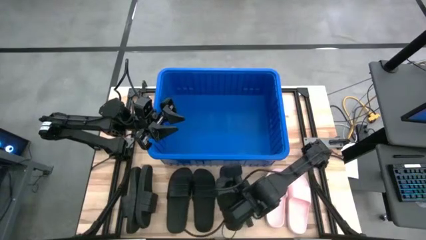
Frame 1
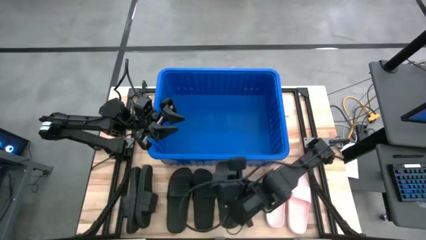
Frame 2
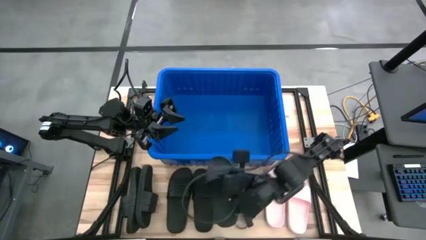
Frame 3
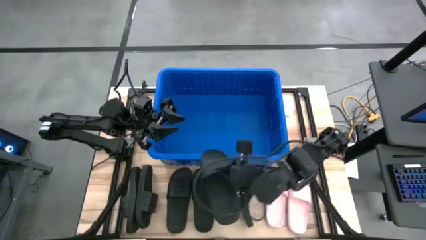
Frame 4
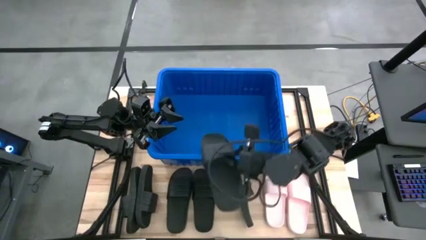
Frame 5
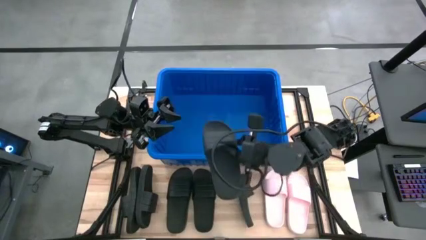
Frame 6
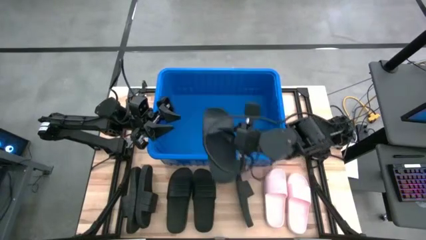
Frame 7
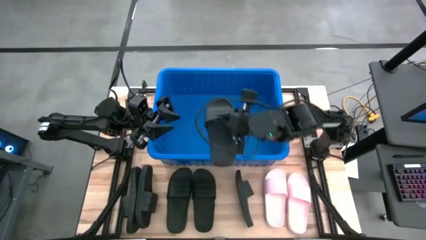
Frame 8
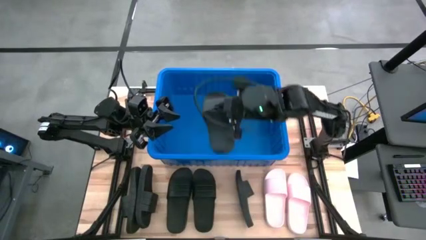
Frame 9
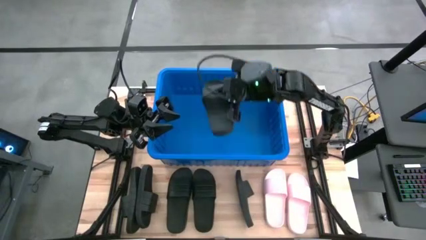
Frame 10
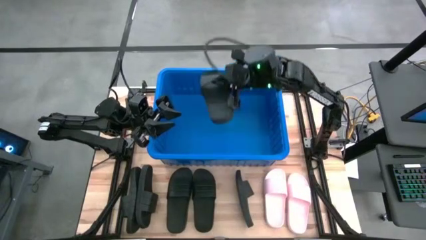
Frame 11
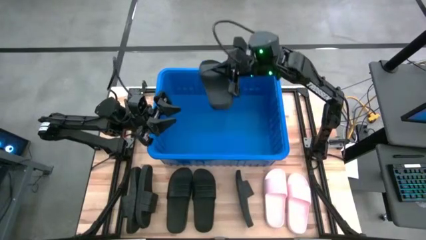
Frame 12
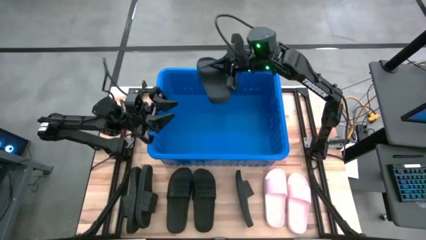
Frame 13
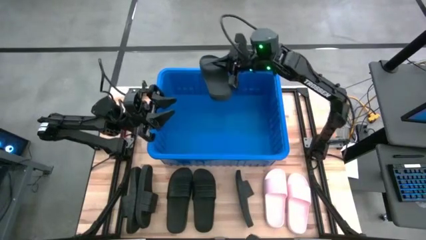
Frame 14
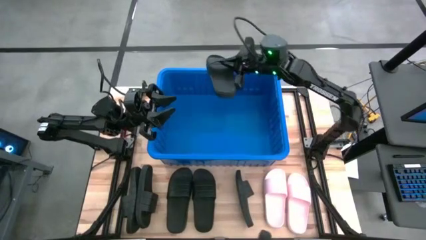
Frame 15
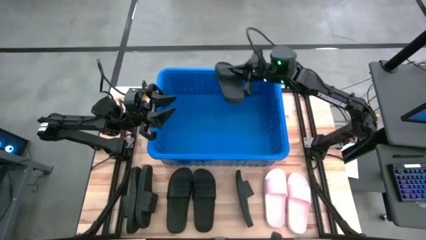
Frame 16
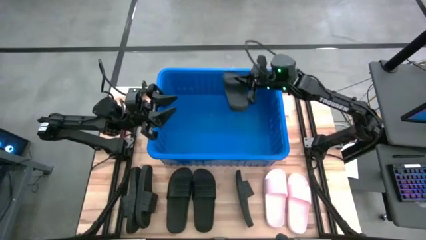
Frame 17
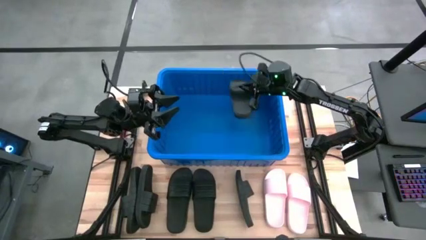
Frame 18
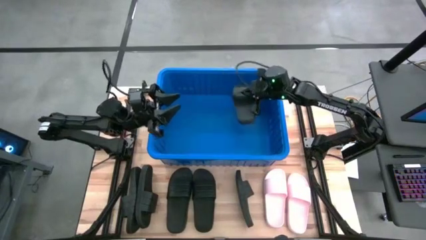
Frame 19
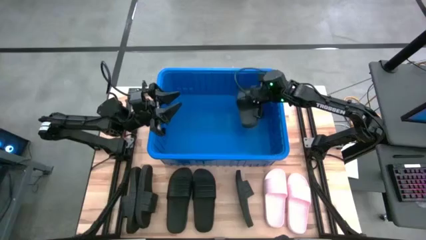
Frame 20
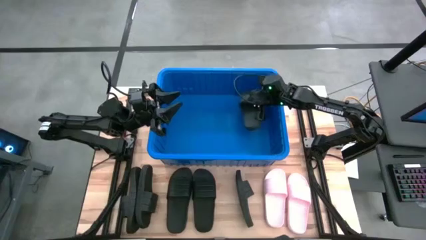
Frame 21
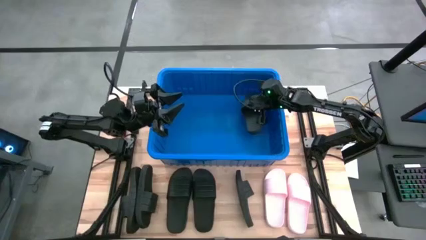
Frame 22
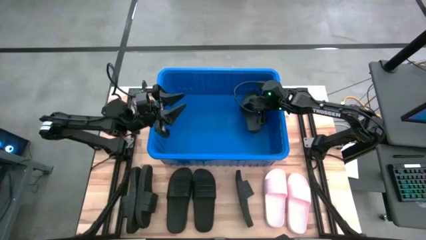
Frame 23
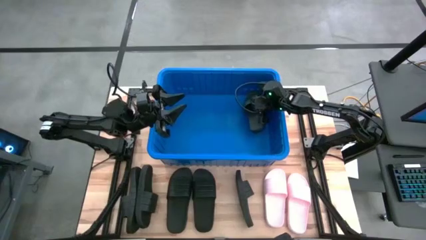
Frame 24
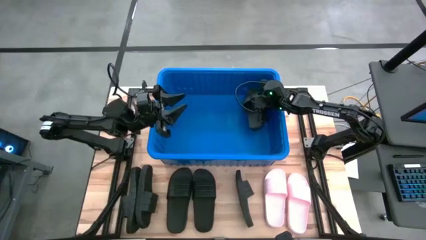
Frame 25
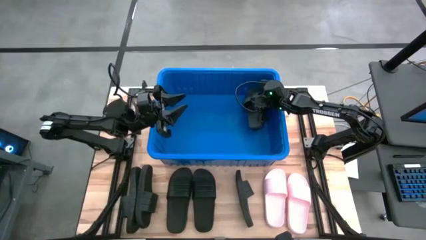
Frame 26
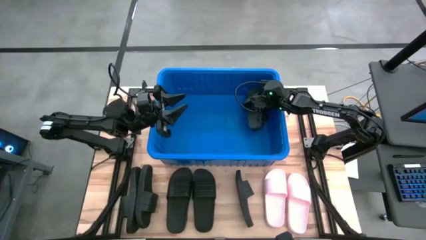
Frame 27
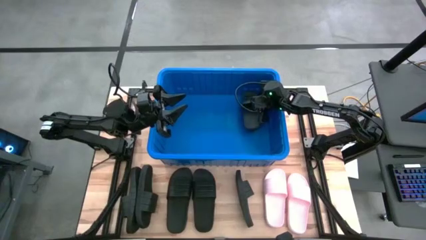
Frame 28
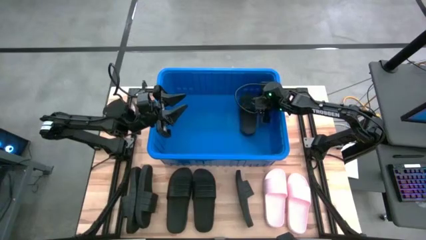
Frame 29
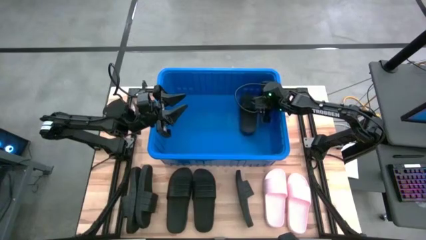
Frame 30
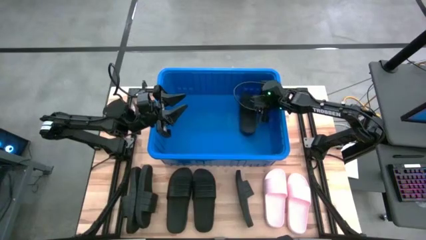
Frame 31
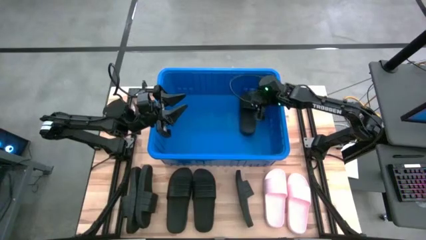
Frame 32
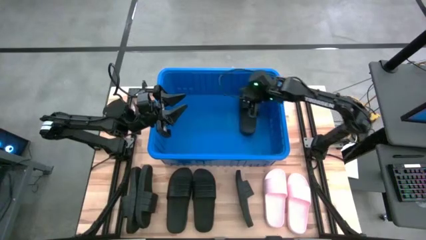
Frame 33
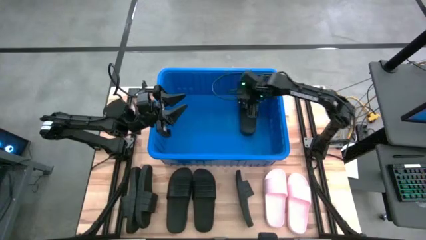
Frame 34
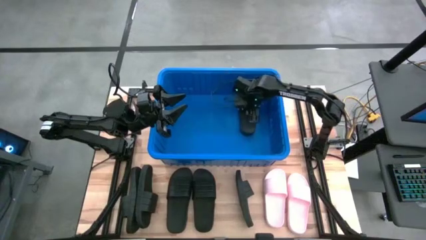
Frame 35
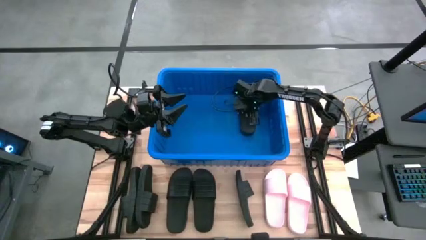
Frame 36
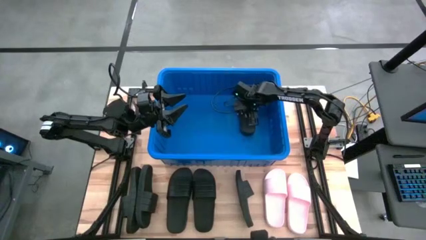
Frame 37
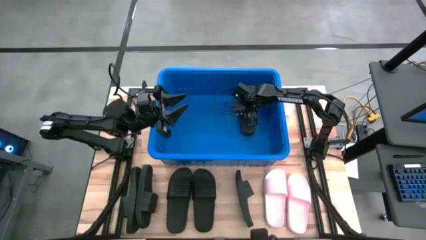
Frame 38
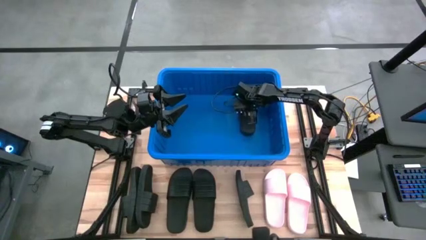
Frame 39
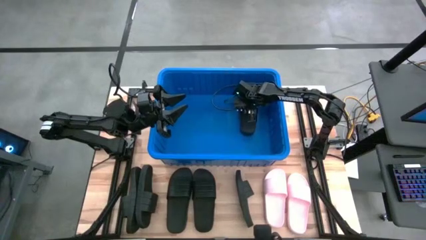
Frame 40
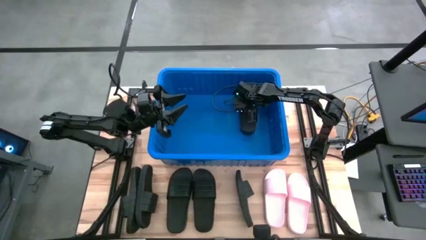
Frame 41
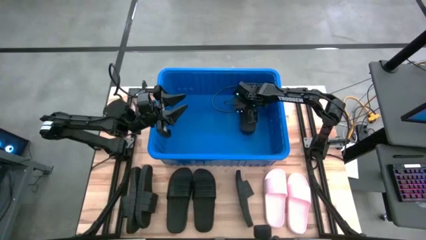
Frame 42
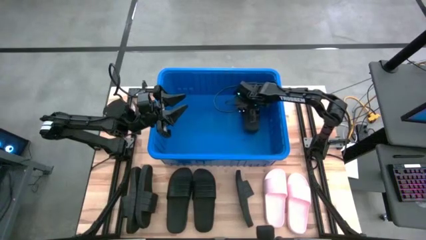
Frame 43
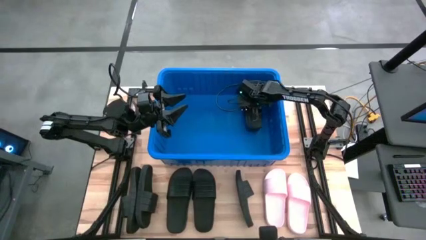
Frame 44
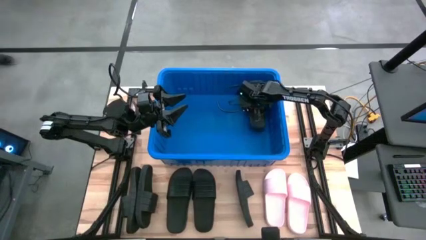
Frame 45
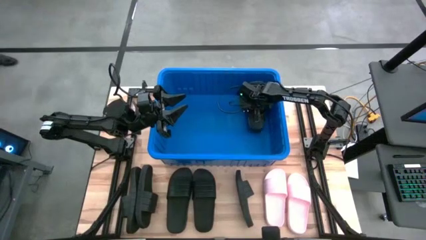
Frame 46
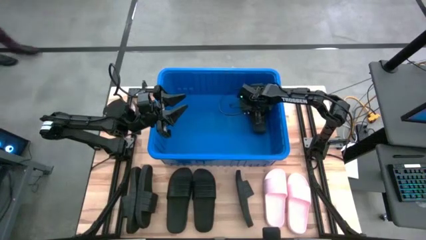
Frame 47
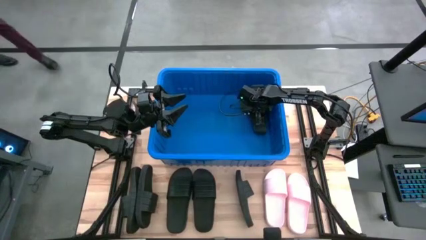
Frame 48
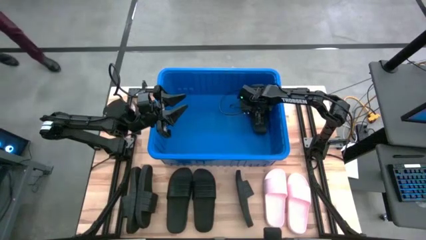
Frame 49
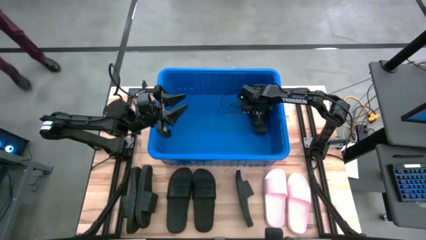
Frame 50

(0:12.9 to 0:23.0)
Task: Pick and place slides into bin
Put the black slide into the blue container
